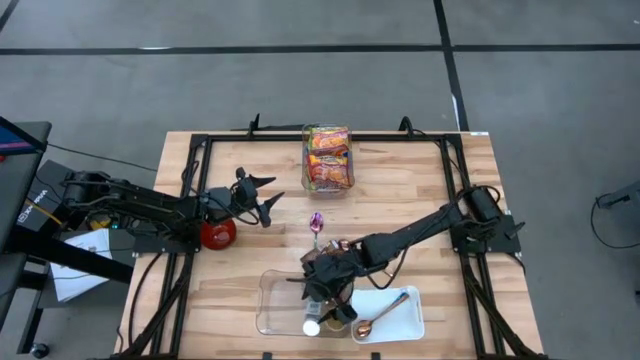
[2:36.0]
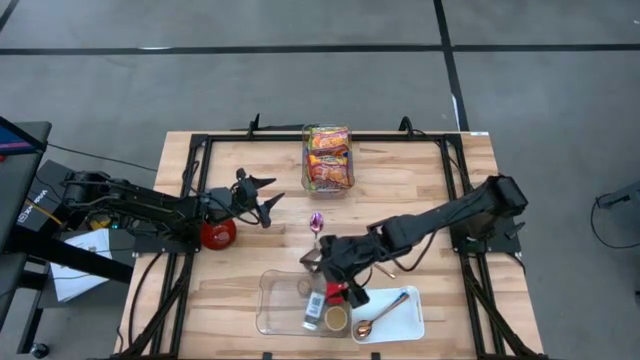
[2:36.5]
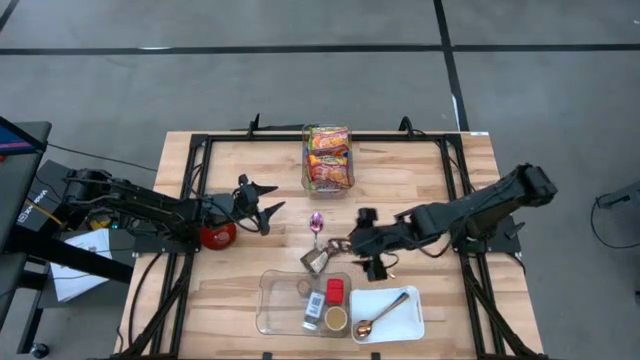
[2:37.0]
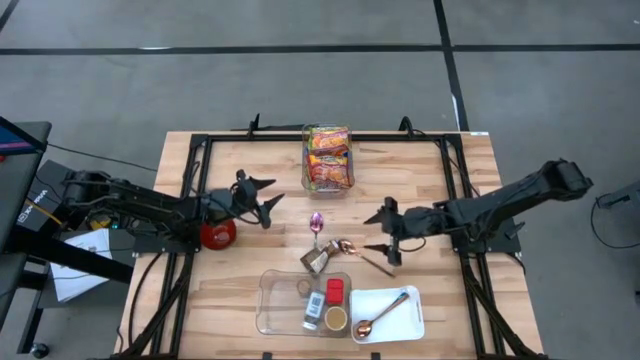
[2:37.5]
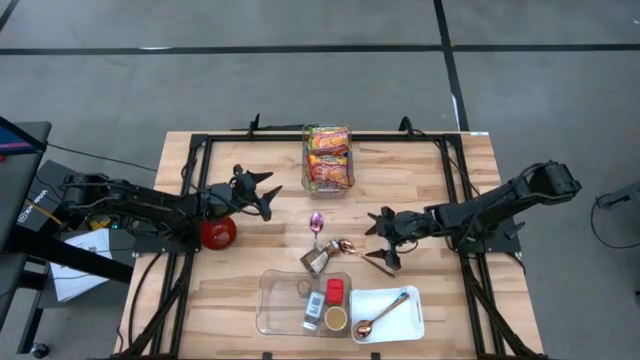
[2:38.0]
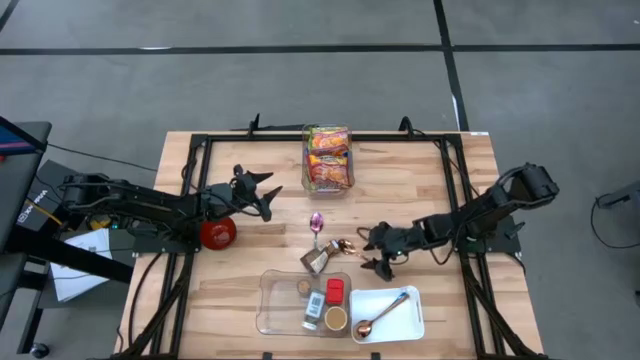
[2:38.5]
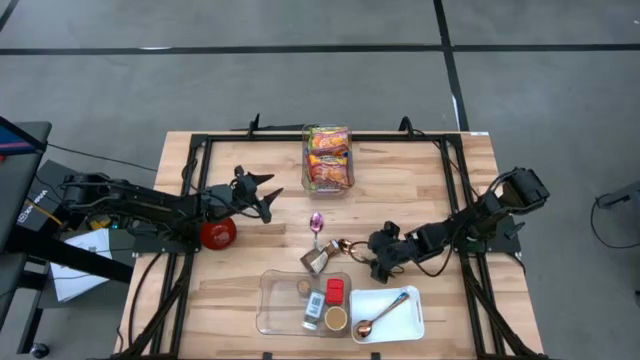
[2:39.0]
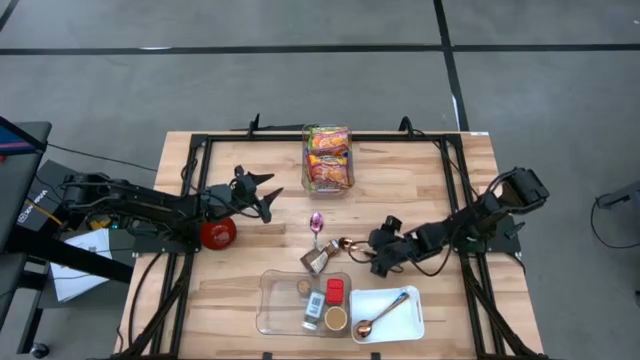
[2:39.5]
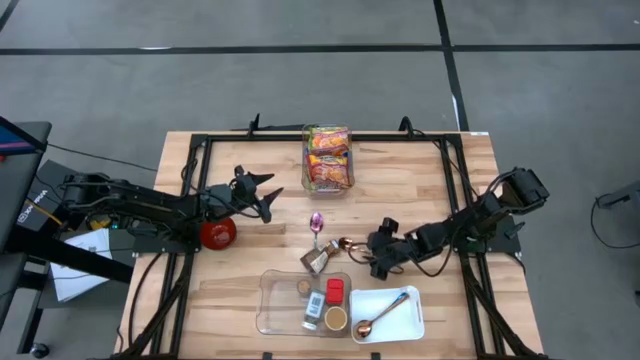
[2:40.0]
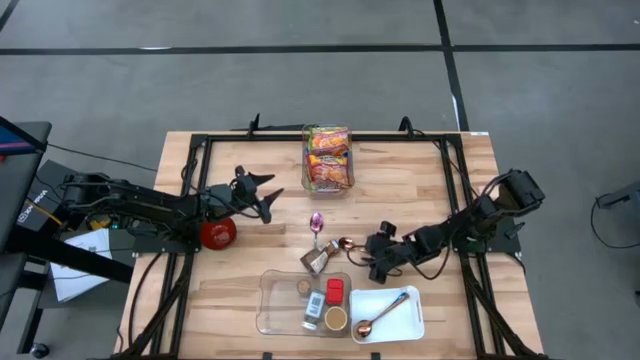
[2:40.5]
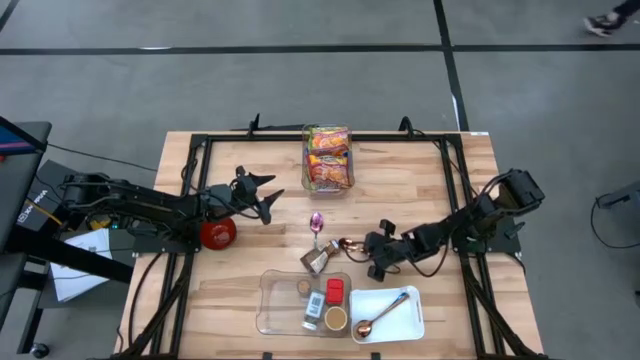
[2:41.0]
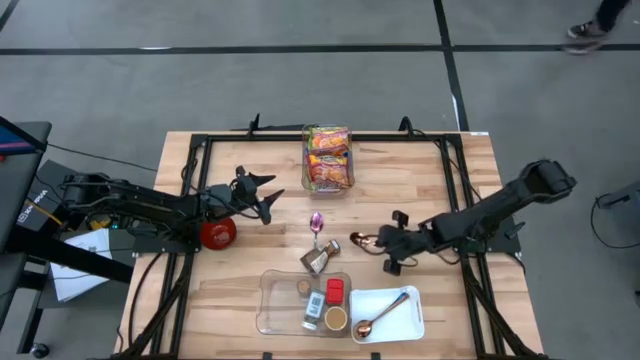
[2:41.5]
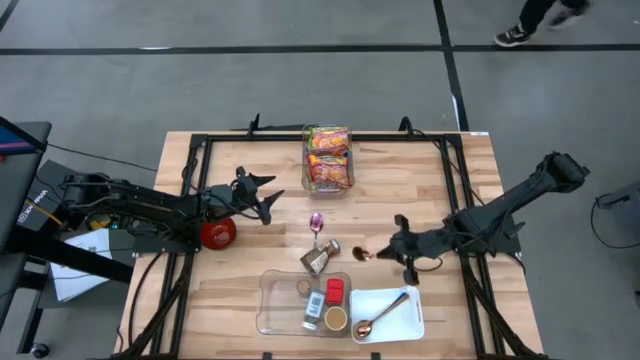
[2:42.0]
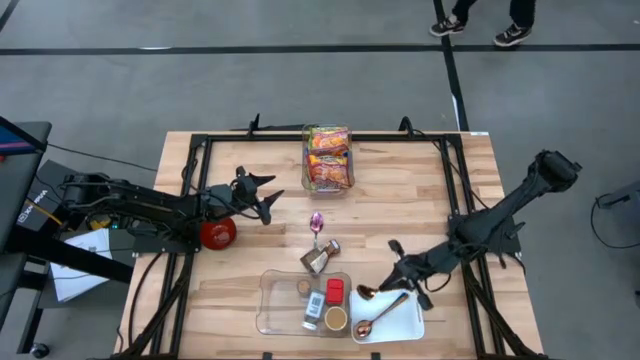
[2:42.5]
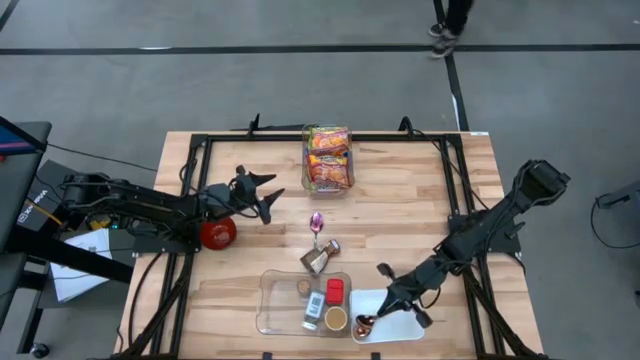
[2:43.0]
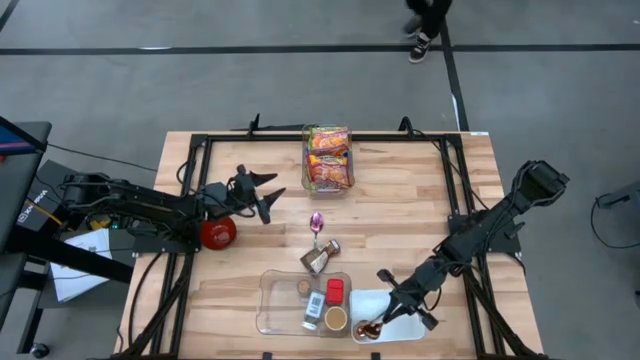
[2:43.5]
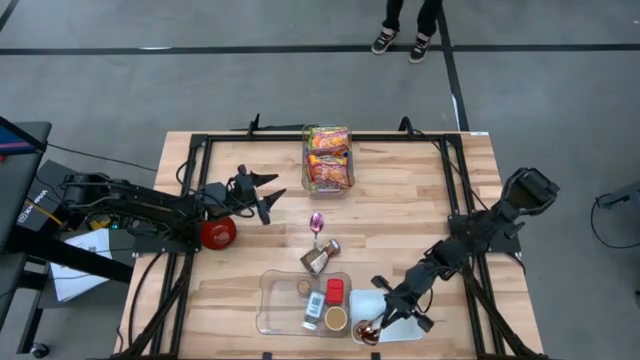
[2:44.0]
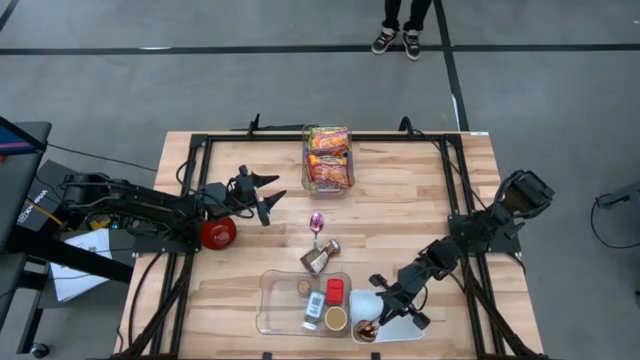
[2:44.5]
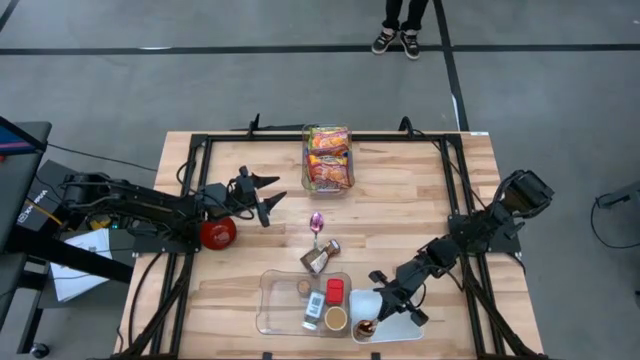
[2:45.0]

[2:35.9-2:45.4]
Task: Pick & Place Food Item
Put the gold spoon into the white bin

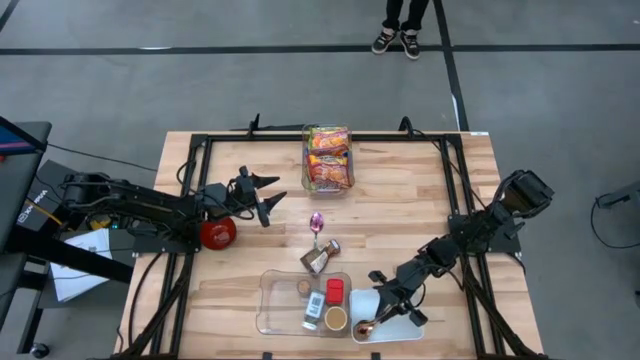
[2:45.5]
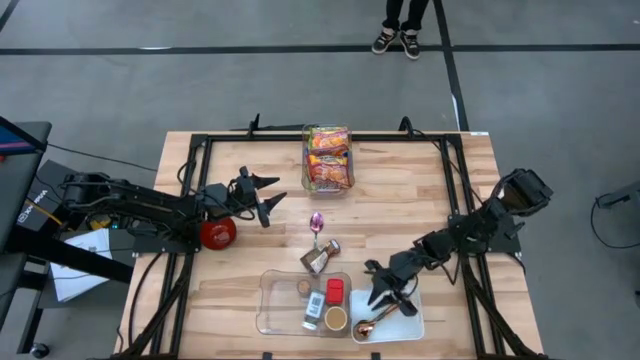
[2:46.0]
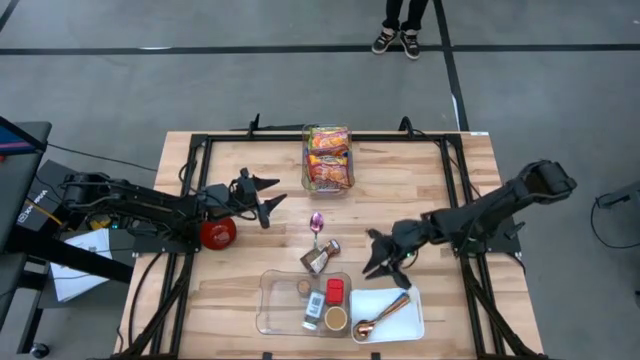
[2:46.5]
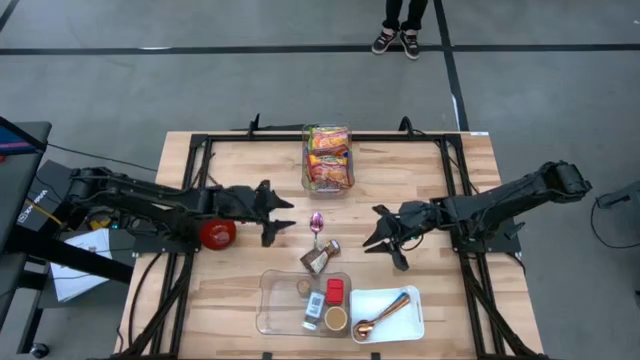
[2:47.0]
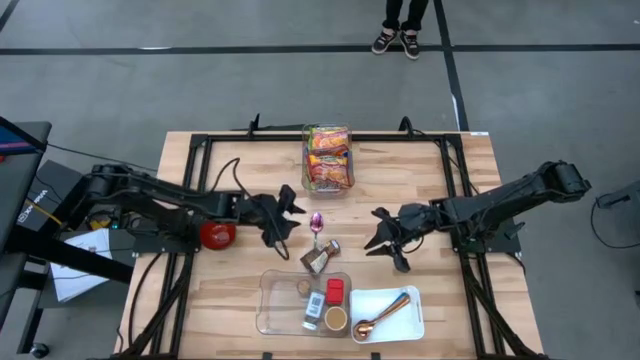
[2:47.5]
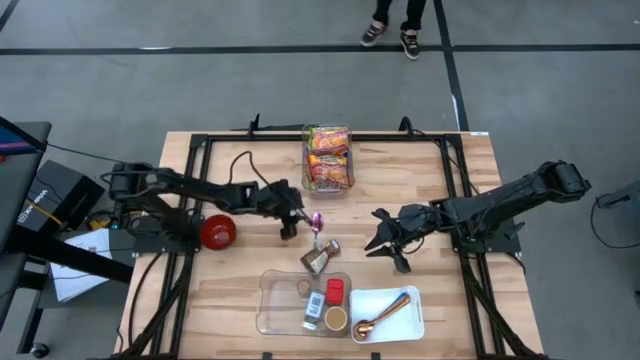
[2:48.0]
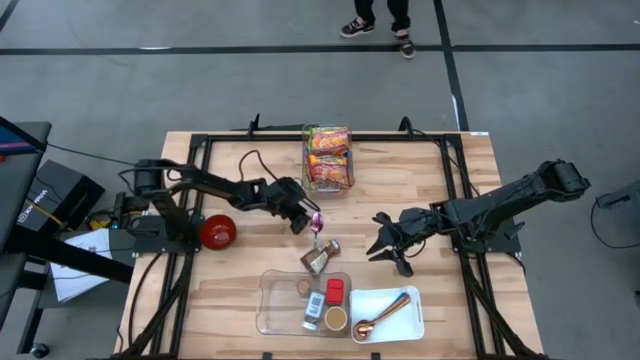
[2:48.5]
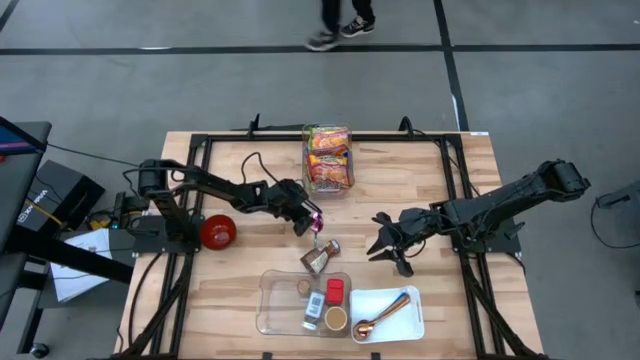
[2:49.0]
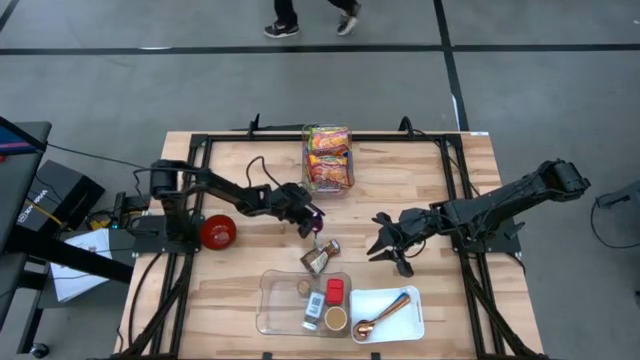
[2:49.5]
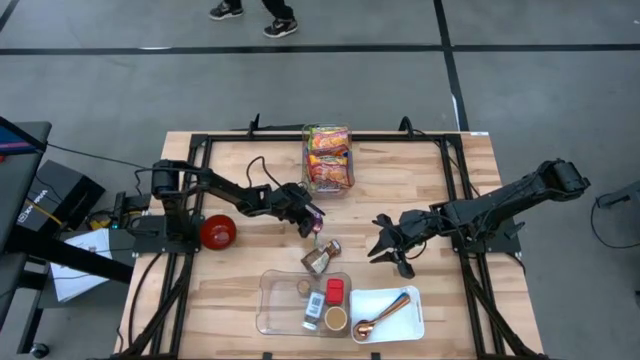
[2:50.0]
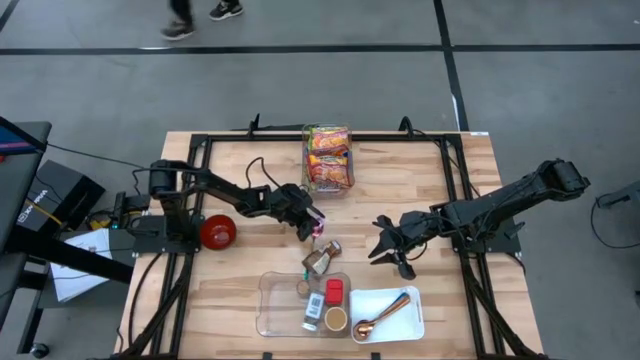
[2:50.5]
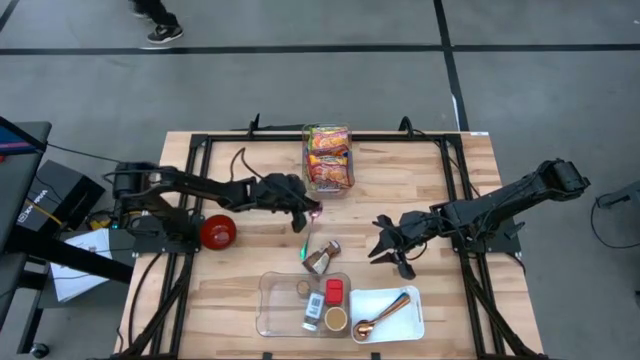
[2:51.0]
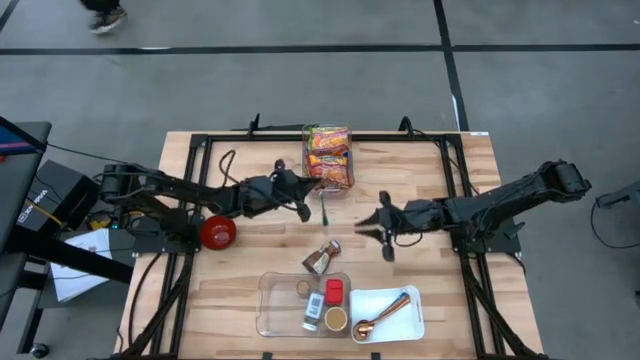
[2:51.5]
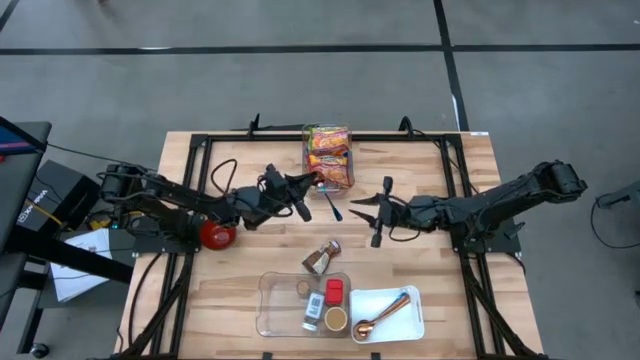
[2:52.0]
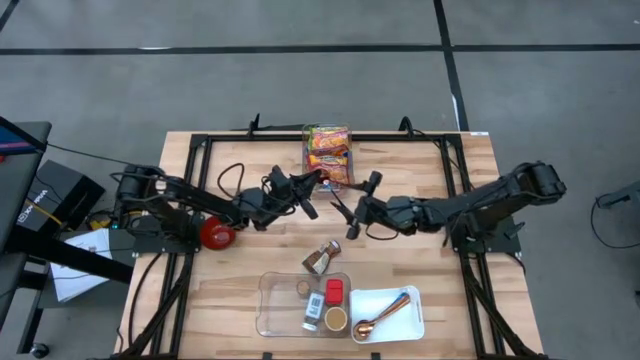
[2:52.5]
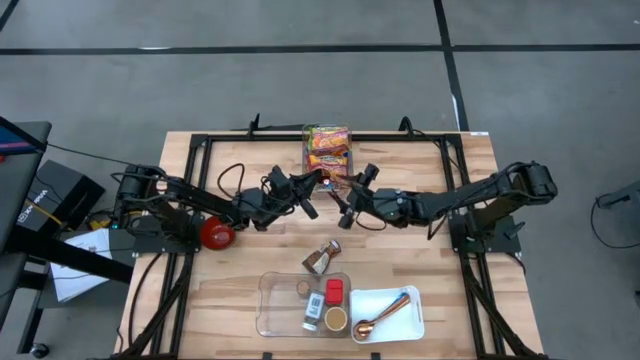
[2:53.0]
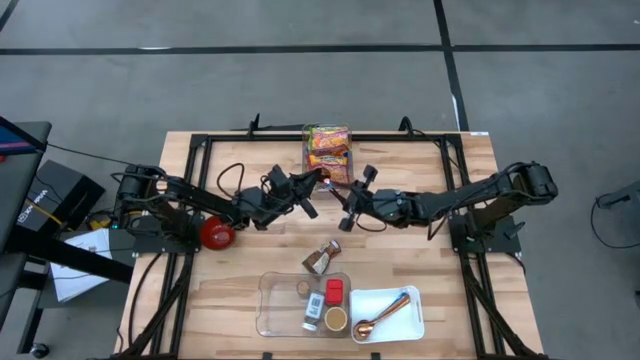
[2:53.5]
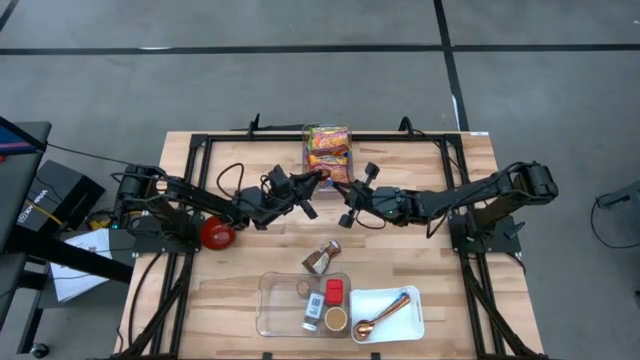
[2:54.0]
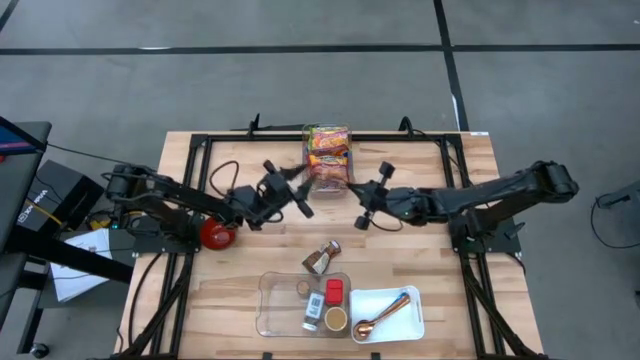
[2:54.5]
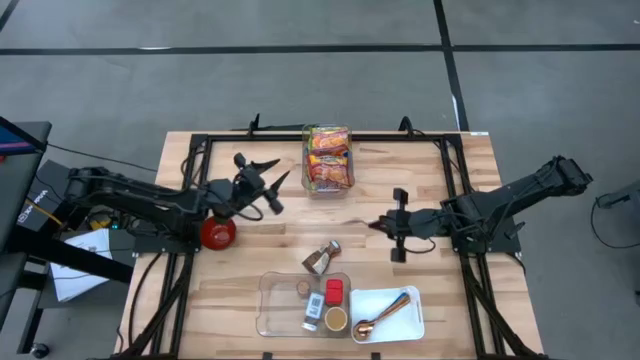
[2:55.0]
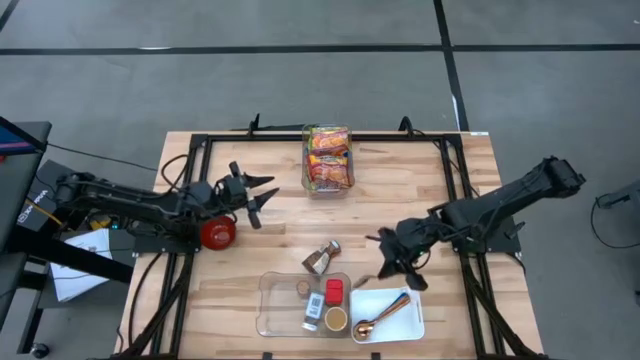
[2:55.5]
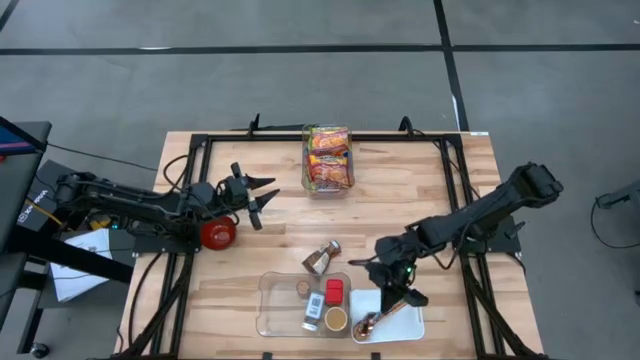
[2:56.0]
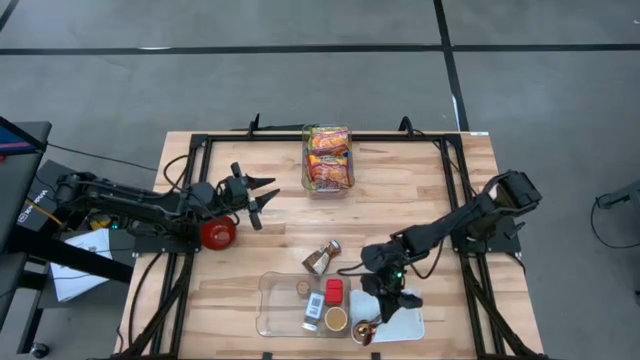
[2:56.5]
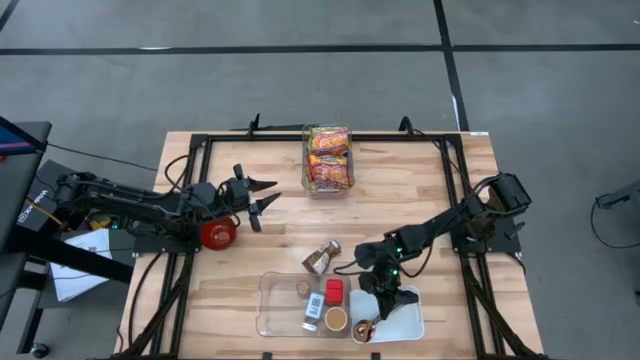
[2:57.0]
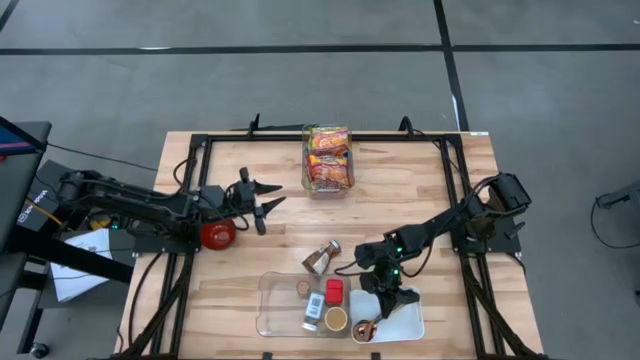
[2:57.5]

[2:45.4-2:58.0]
Put the blue spoon into the white bin

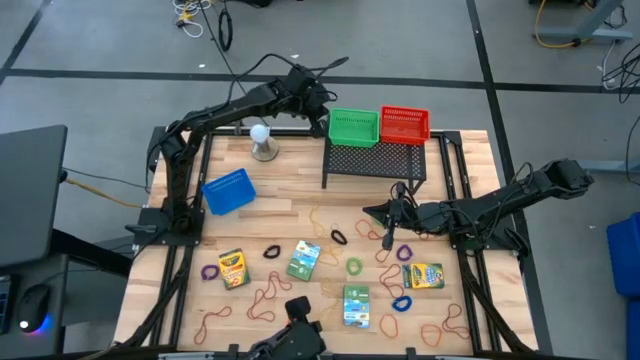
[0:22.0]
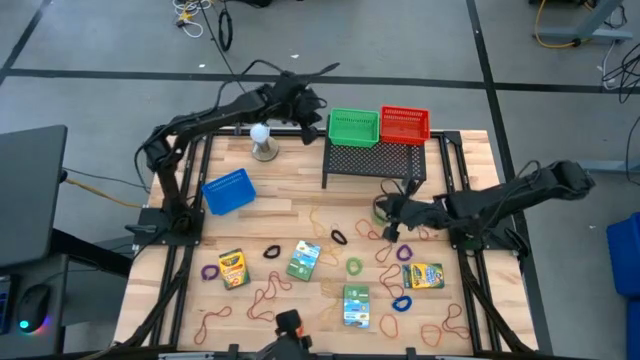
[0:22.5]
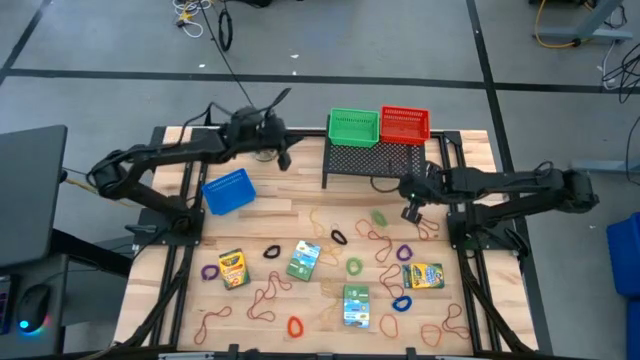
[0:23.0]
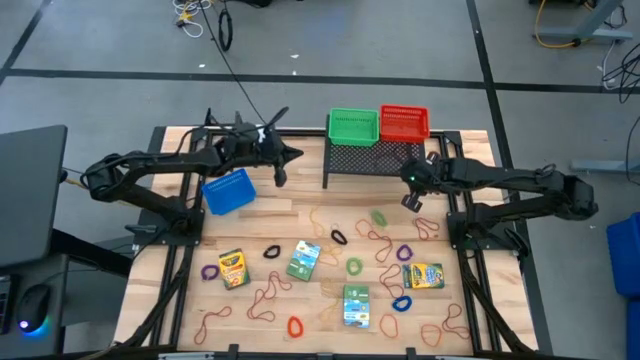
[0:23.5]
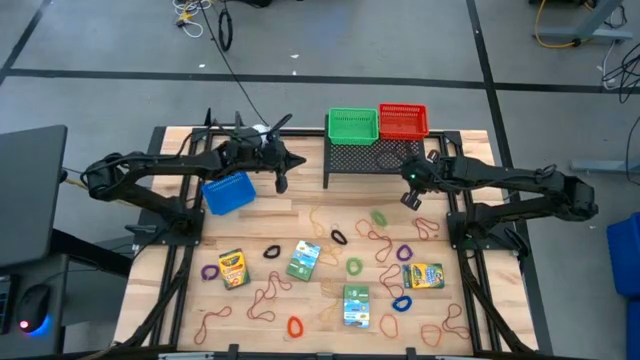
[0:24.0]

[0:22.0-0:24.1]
Task: Pick & Place Office Desk Supplies
Adjust the black shelf
